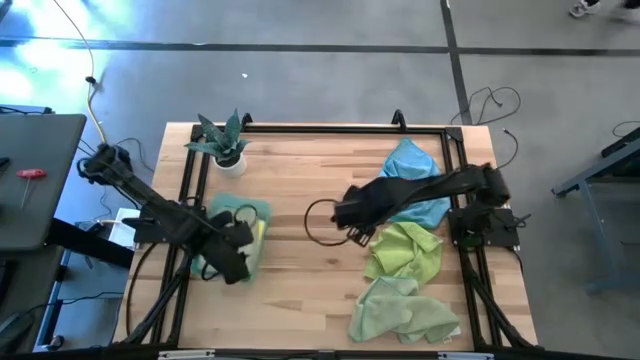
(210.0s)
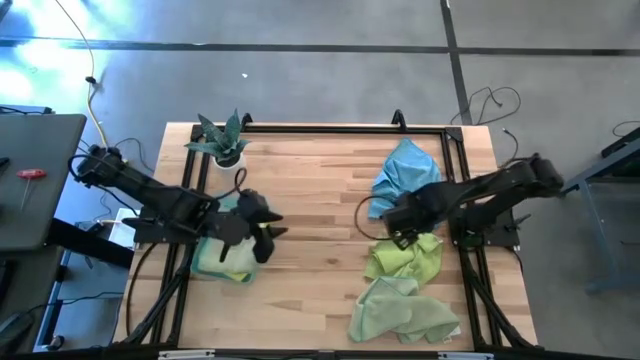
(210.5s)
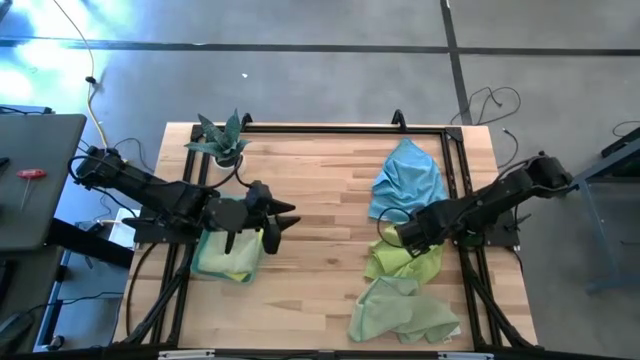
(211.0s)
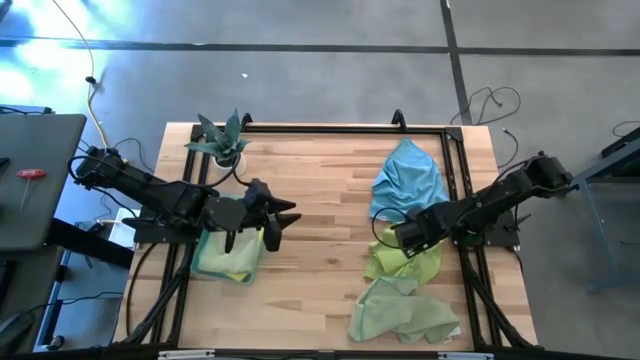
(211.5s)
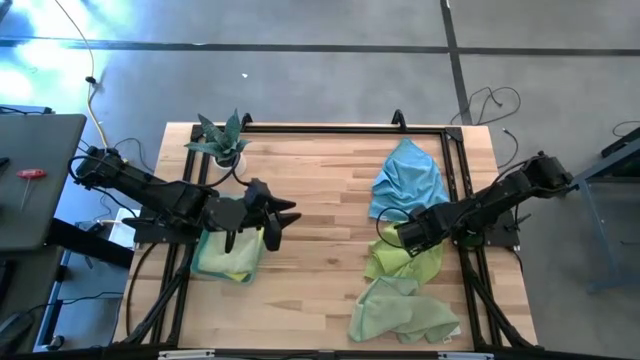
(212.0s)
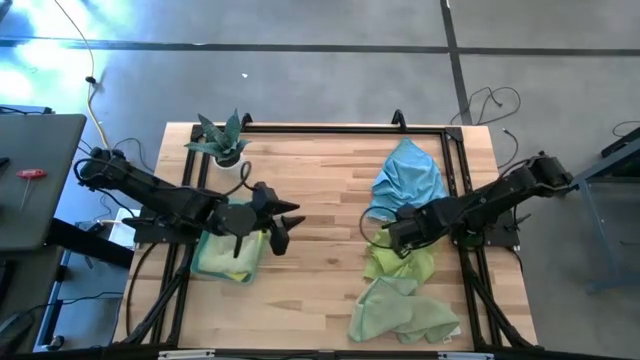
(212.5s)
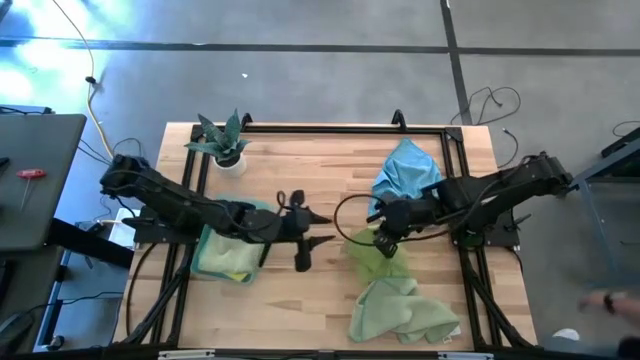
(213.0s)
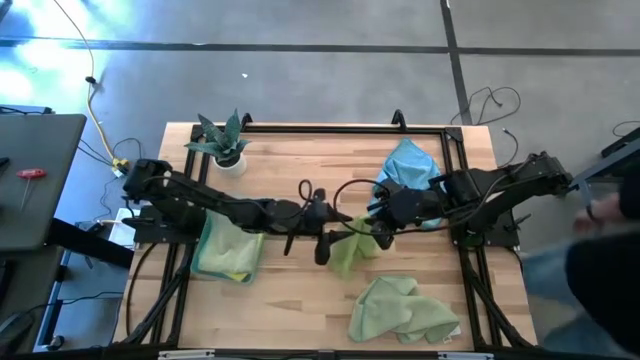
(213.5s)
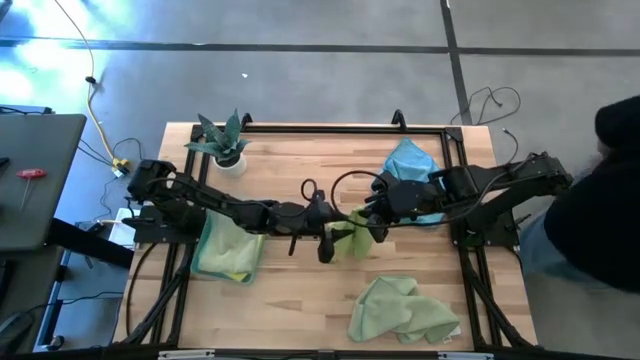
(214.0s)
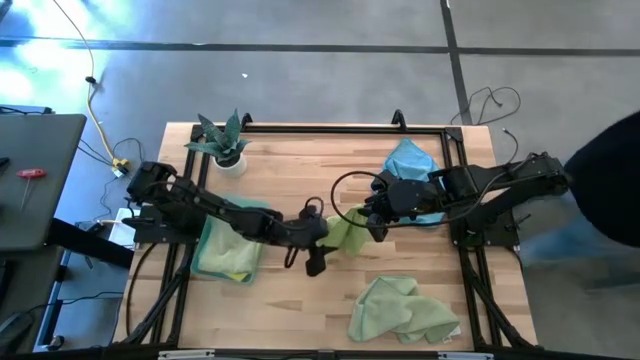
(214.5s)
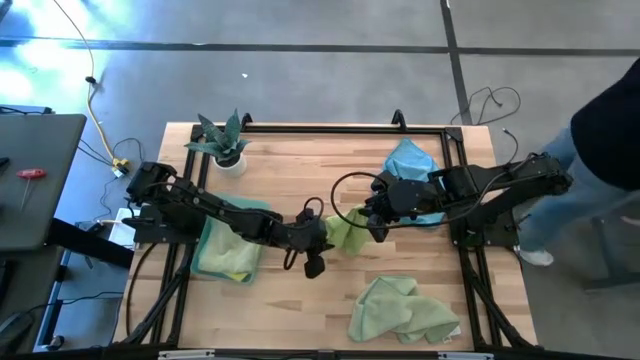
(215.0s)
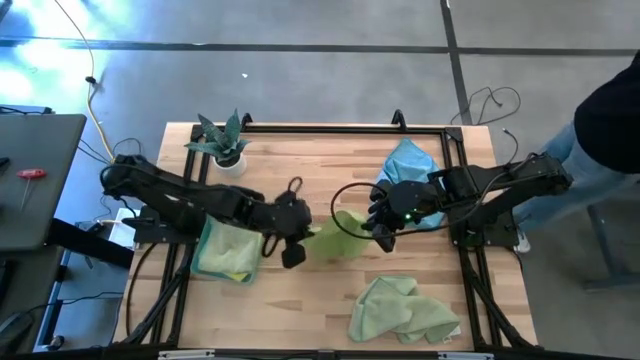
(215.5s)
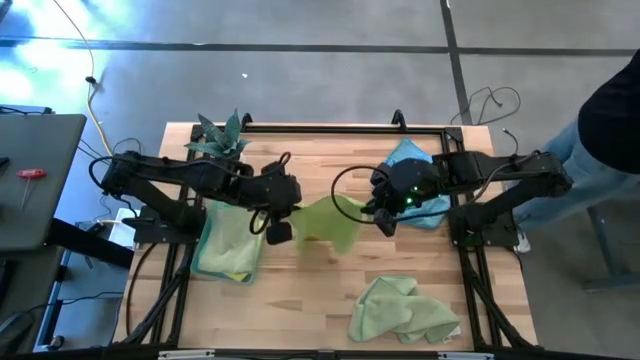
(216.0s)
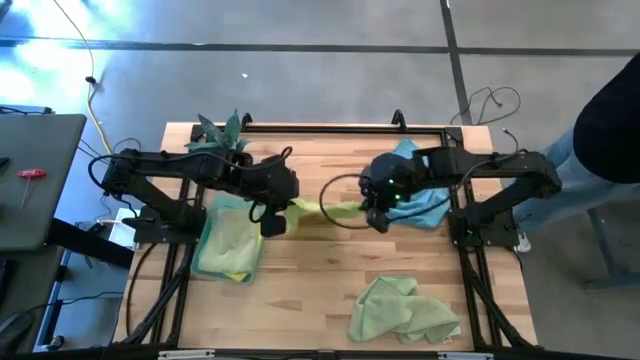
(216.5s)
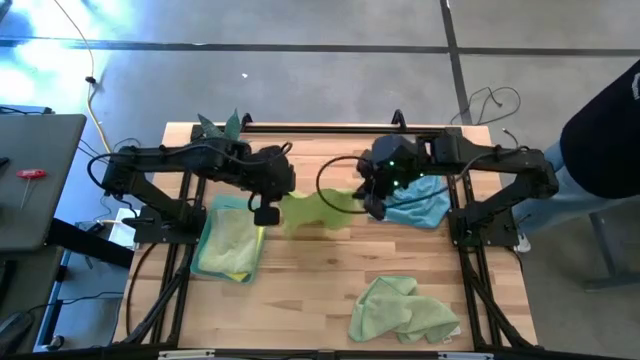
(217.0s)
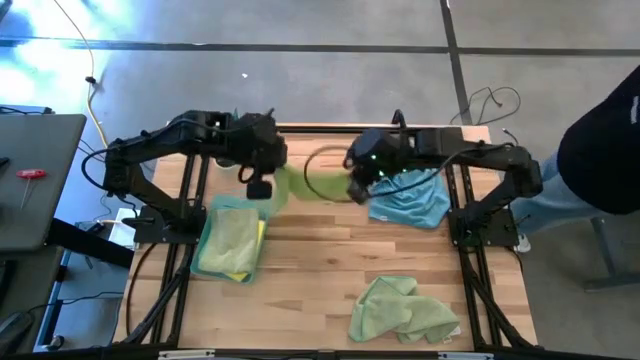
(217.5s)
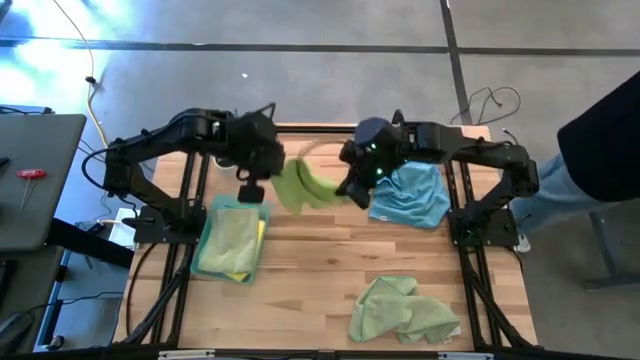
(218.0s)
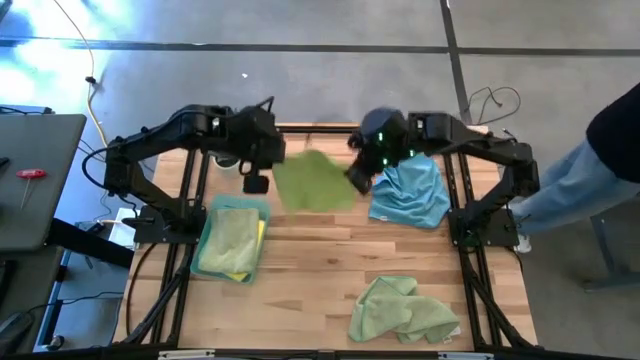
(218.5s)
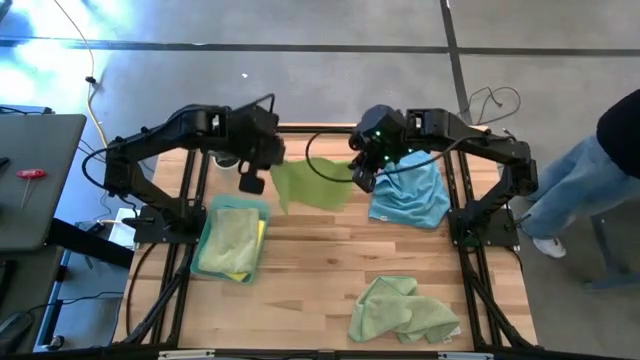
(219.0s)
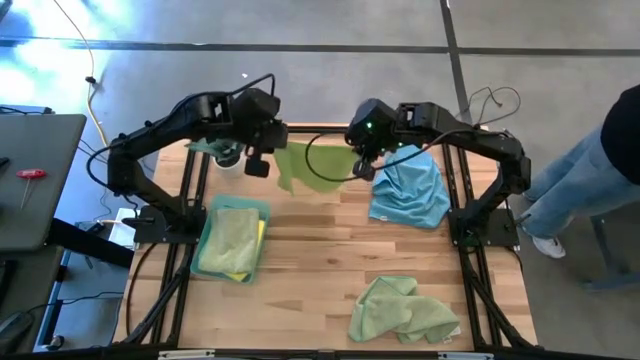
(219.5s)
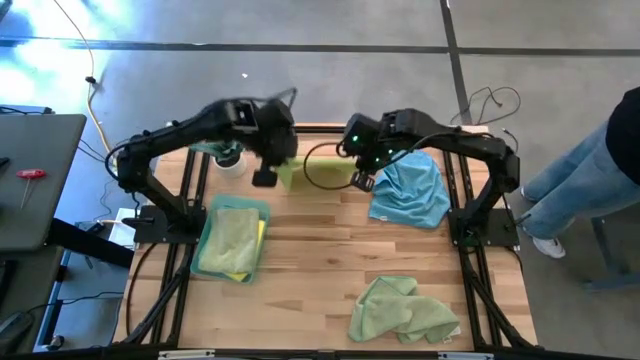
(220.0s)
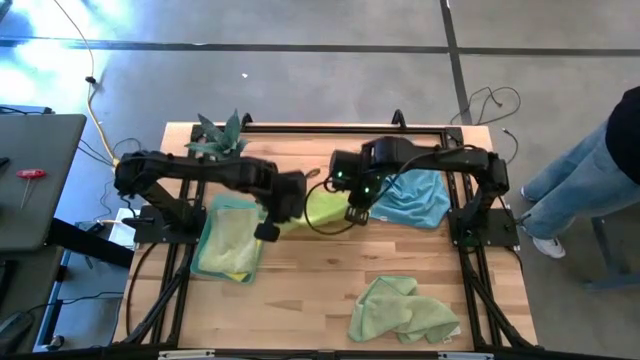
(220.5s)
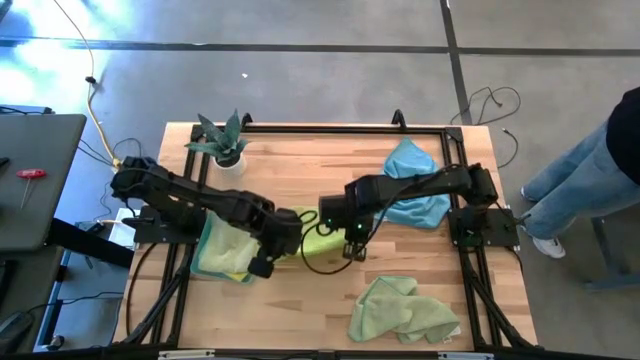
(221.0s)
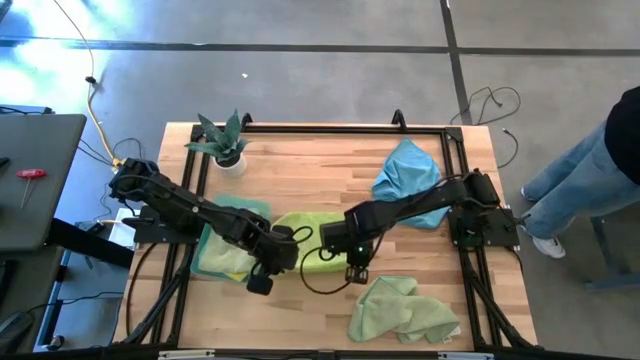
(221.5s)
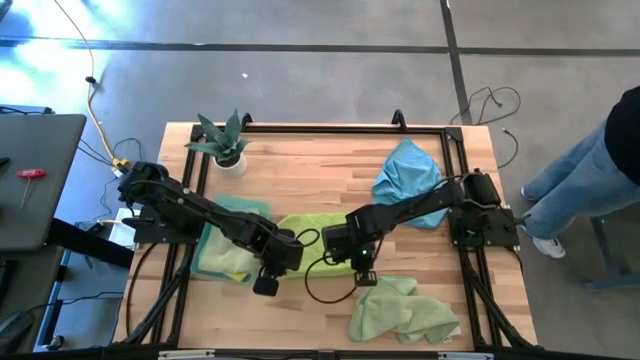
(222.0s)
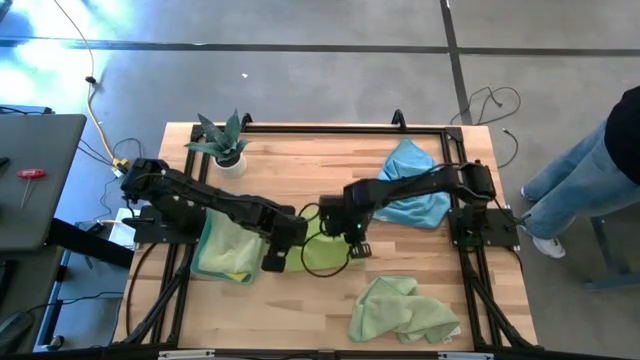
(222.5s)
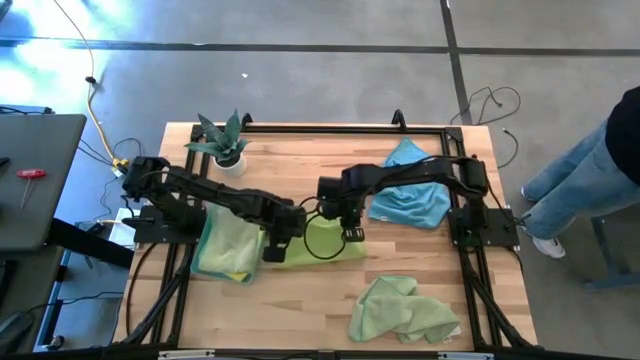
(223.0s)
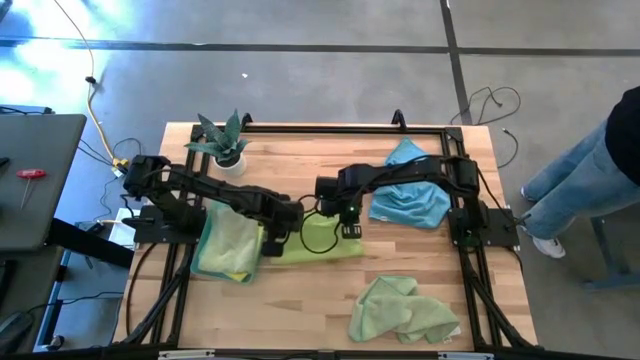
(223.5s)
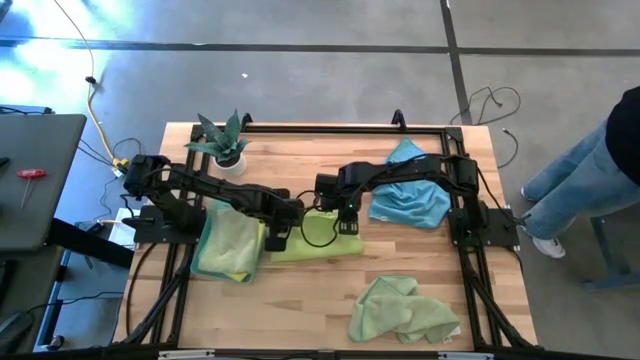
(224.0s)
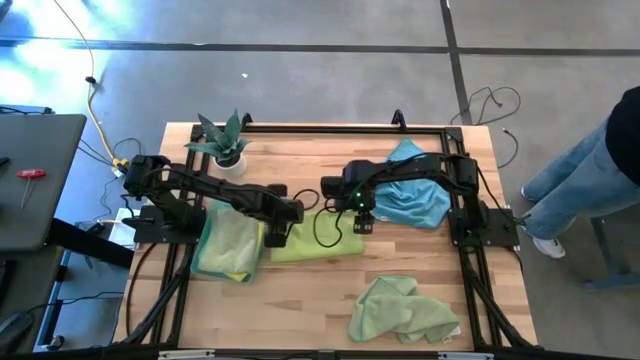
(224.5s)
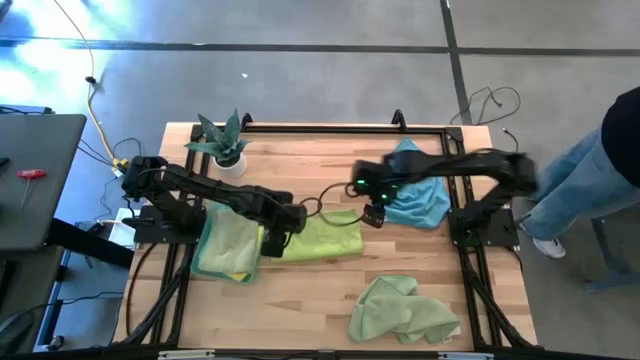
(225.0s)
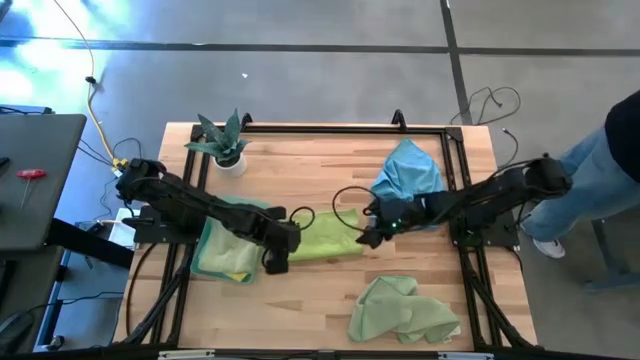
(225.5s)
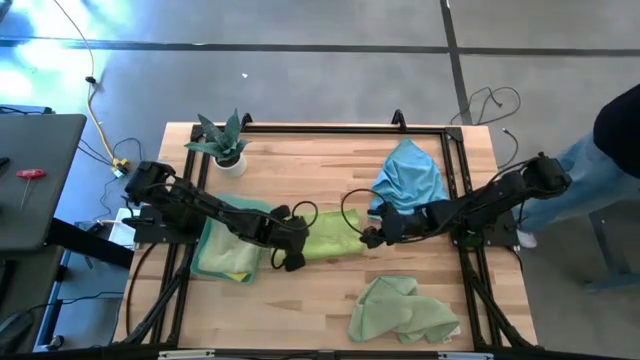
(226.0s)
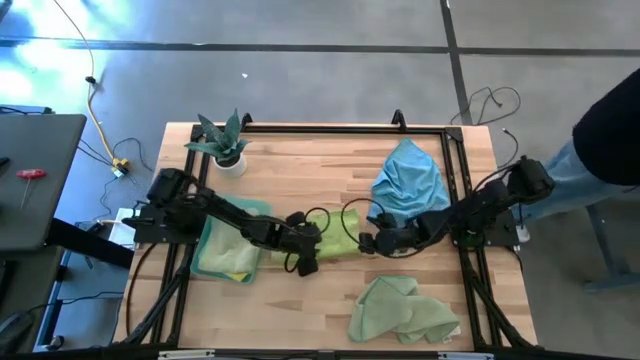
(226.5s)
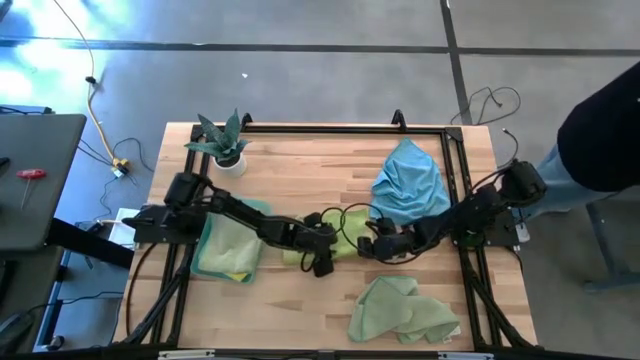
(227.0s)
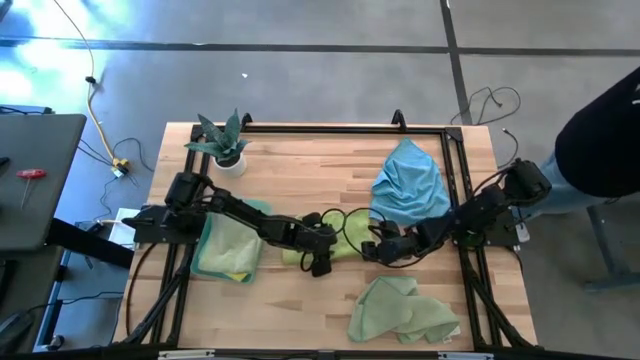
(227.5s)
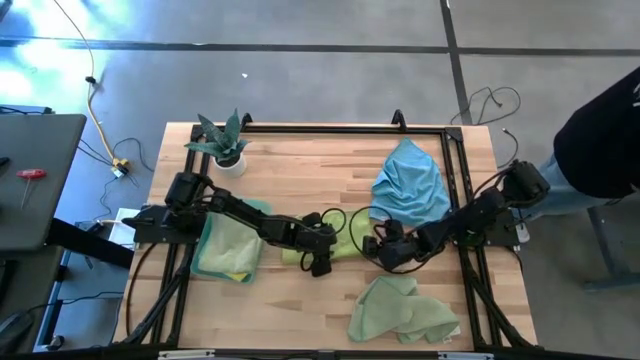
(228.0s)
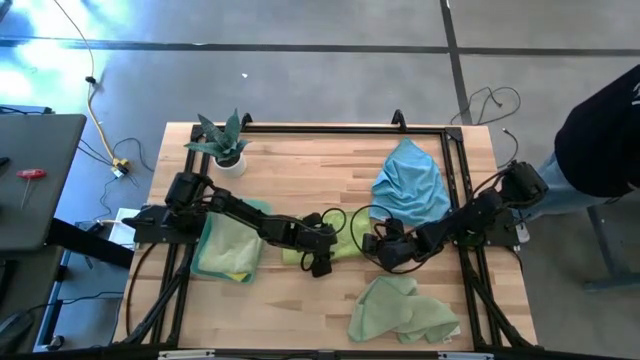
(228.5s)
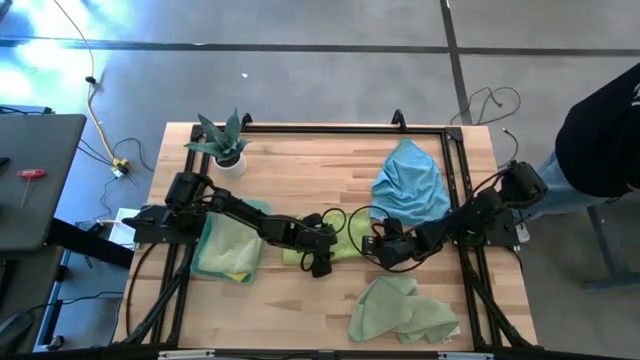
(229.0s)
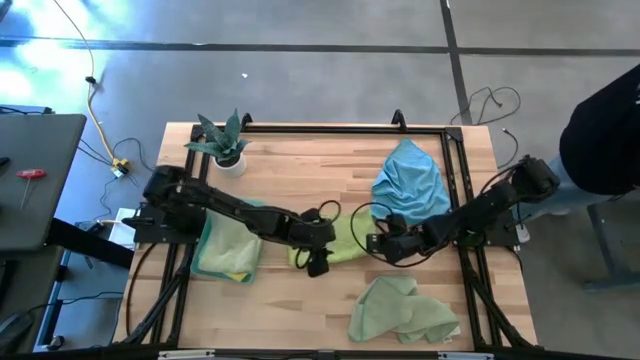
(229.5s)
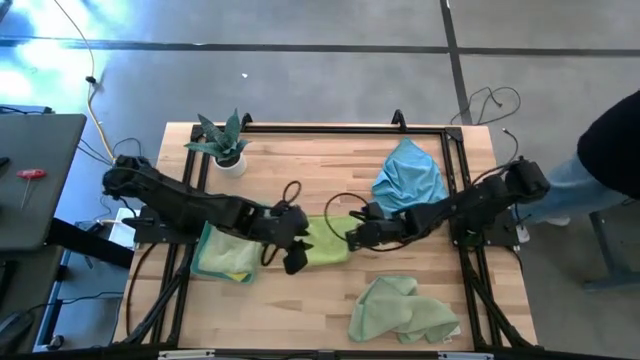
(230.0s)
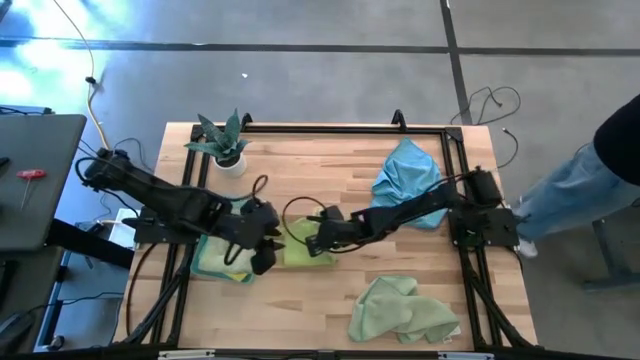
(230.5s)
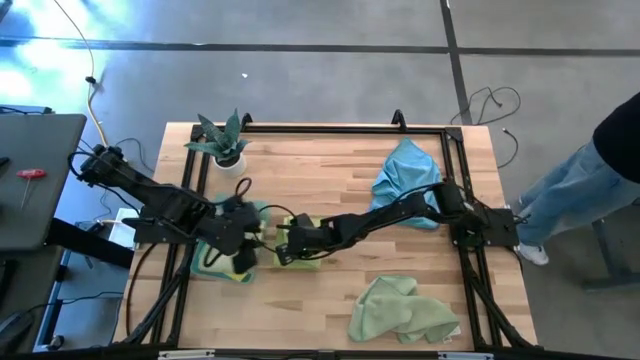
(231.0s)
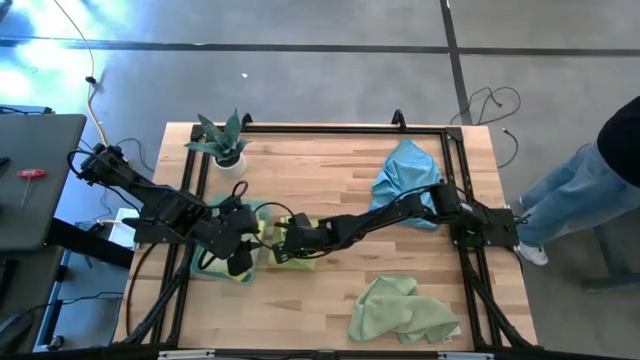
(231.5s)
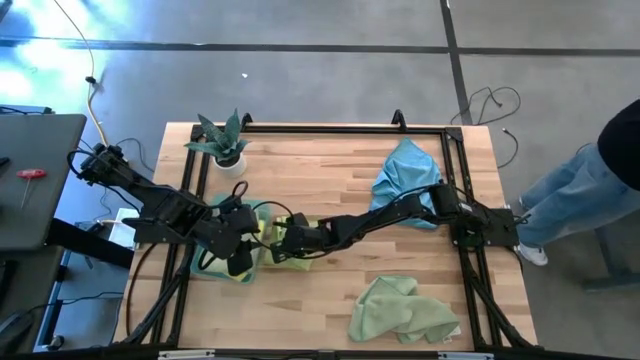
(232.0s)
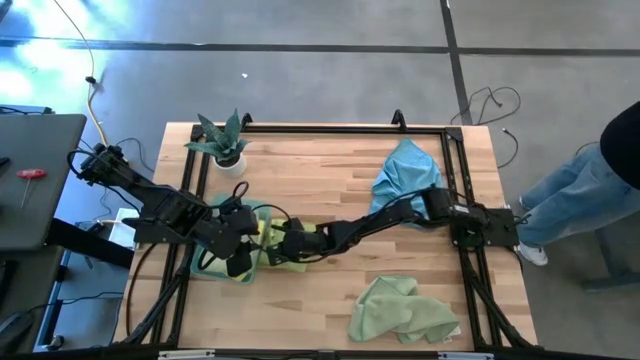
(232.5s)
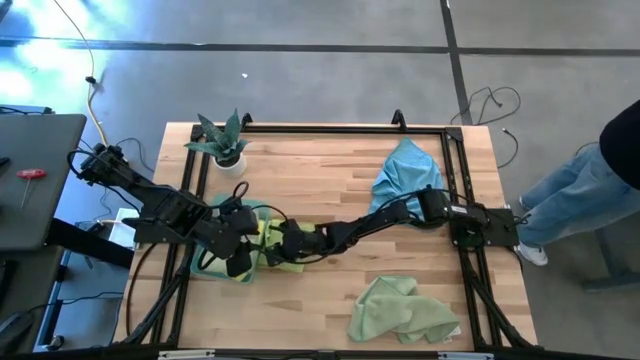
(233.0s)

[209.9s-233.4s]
Task: Fold microfiber towels
Fold the light green microfiber towel
